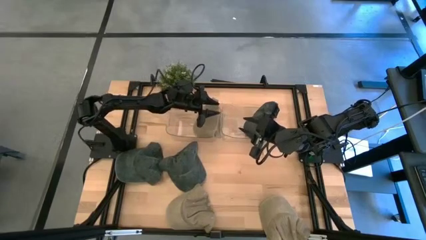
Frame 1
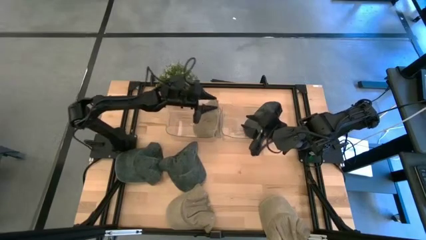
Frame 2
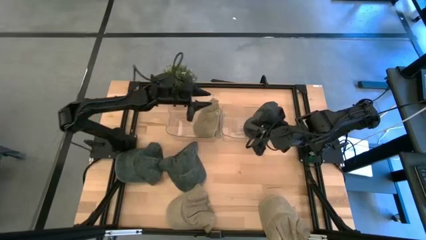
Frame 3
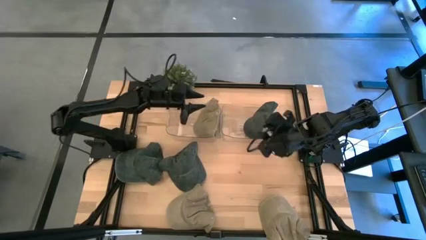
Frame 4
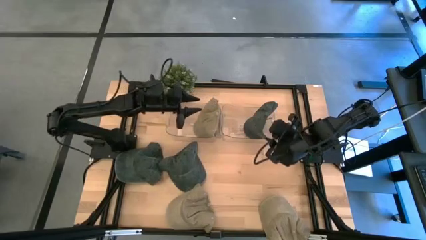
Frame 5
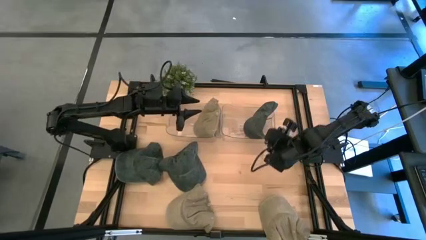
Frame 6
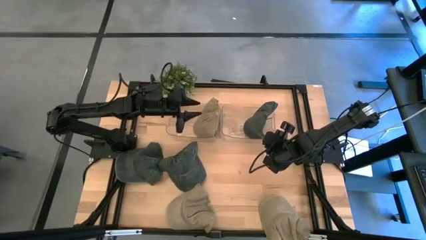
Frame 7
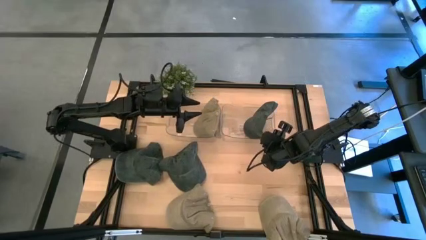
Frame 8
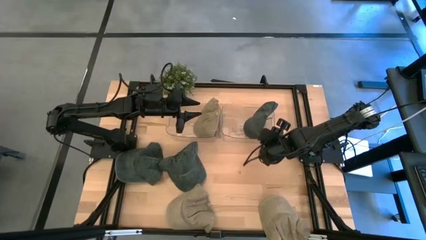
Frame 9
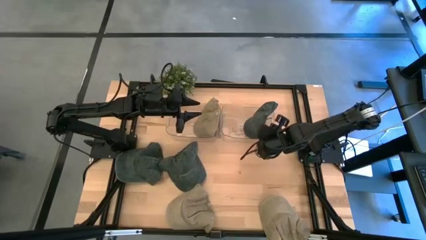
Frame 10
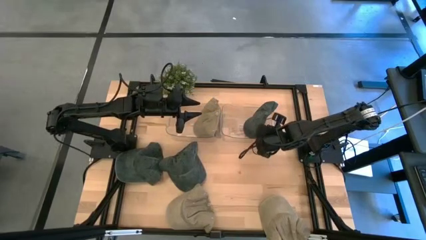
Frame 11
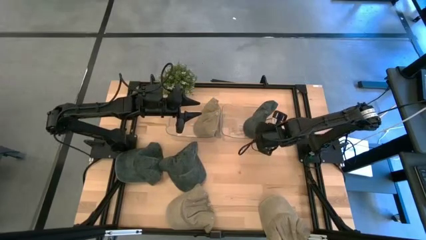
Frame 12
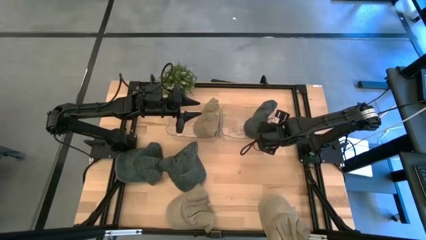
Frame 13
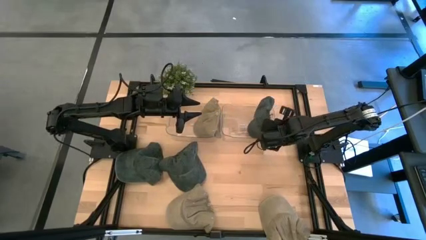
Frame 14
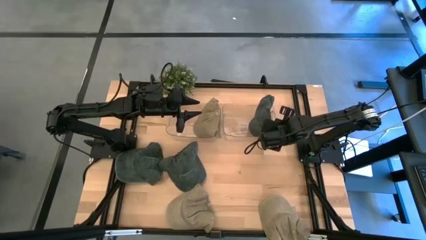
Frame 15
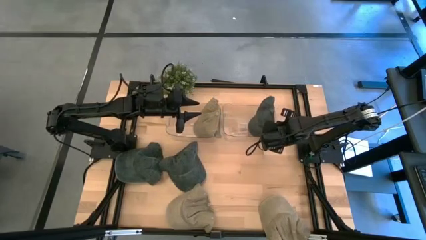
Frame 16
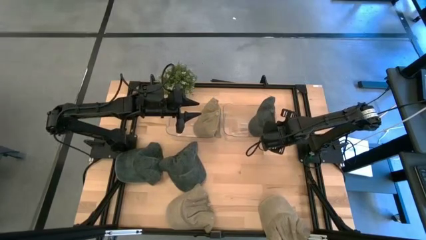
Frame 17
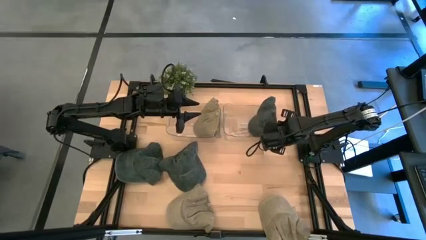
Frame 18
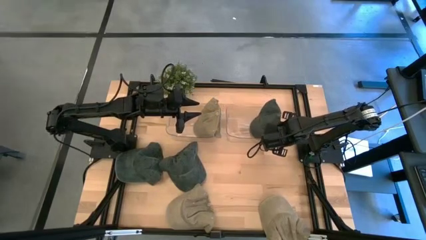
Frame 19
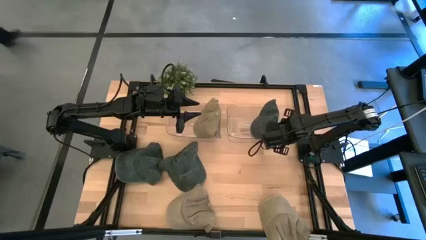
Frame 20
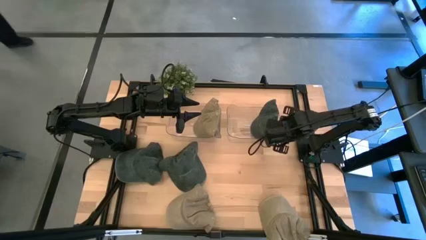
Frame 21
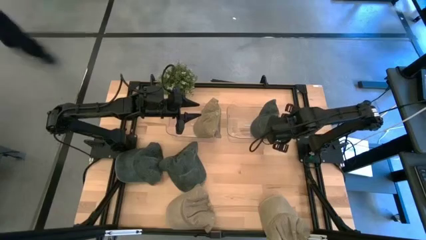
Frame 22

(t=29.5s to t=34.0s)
Task: Pick & Place hat
Adjust the black cap on the right transparent bin

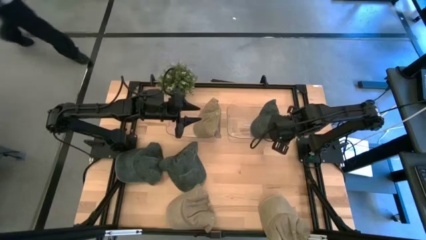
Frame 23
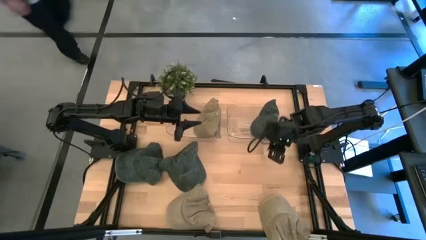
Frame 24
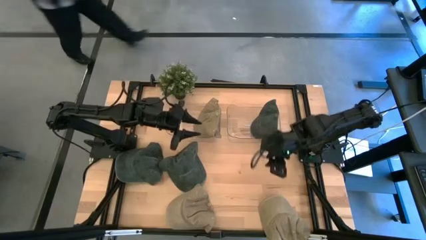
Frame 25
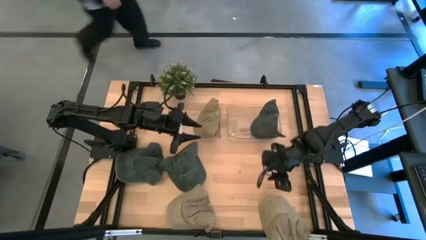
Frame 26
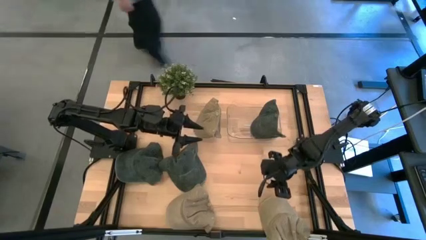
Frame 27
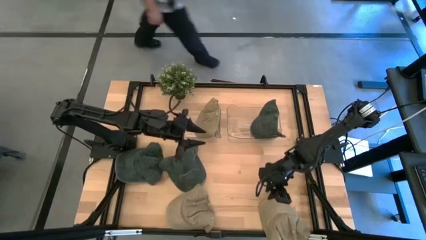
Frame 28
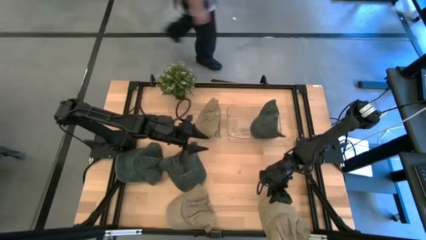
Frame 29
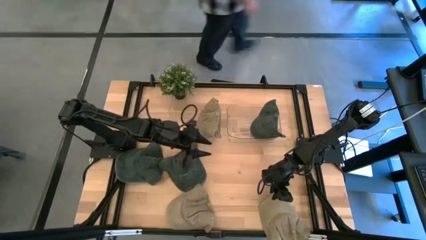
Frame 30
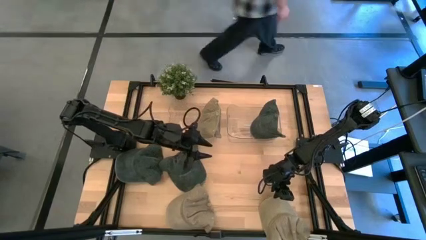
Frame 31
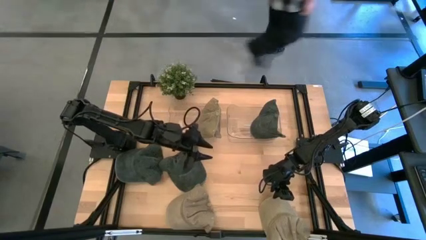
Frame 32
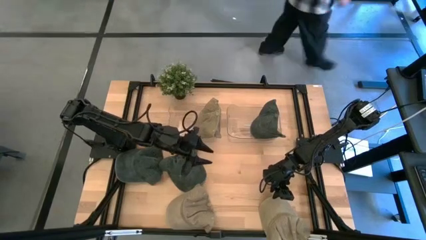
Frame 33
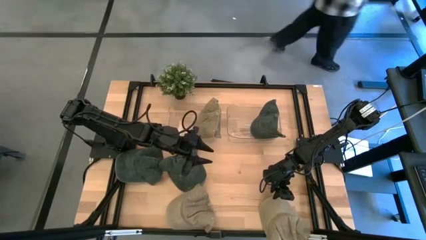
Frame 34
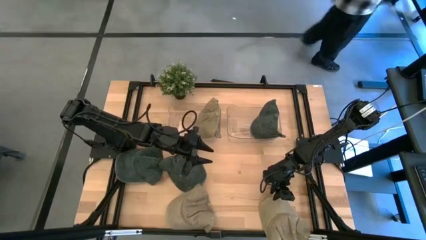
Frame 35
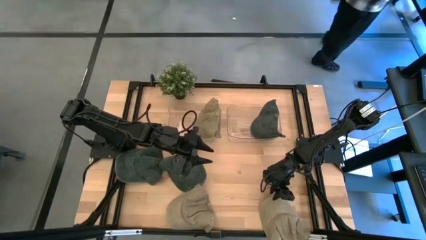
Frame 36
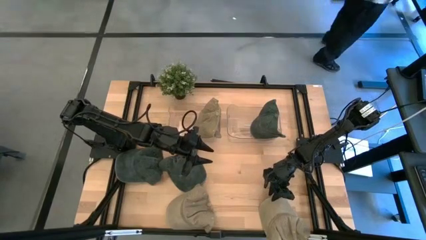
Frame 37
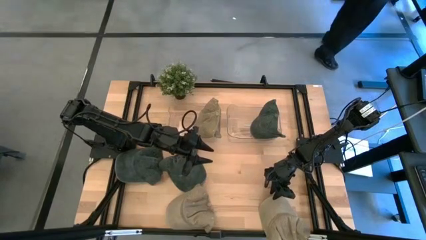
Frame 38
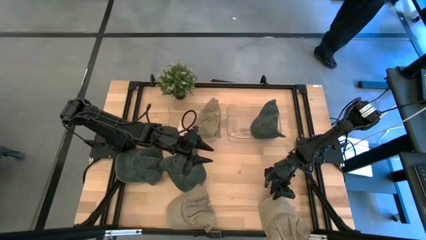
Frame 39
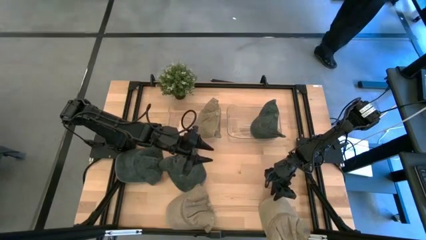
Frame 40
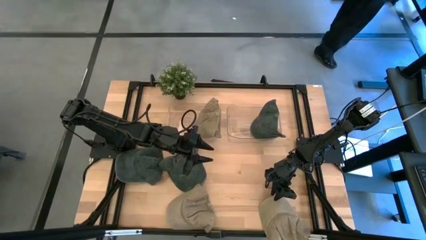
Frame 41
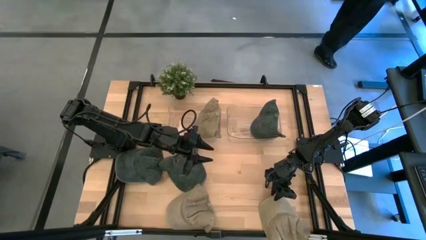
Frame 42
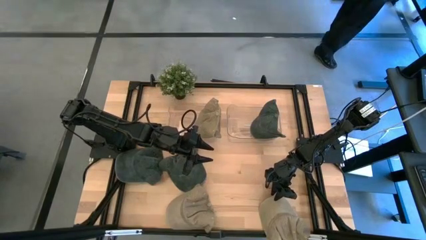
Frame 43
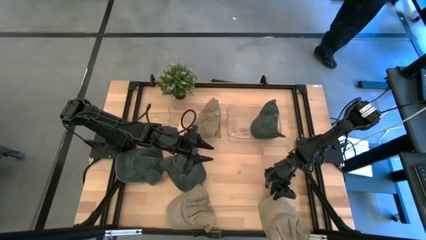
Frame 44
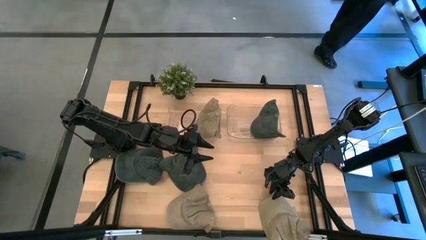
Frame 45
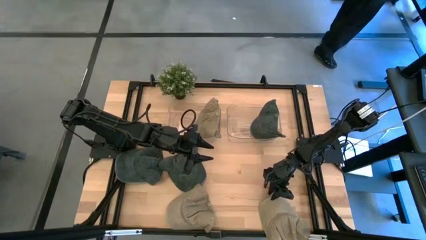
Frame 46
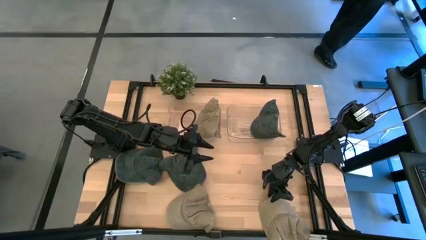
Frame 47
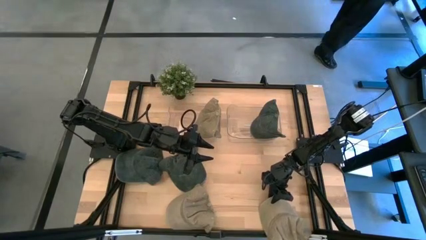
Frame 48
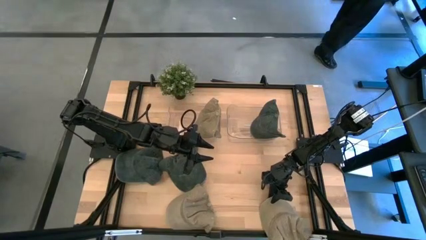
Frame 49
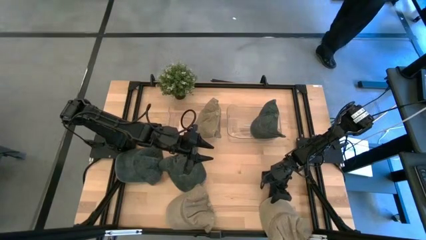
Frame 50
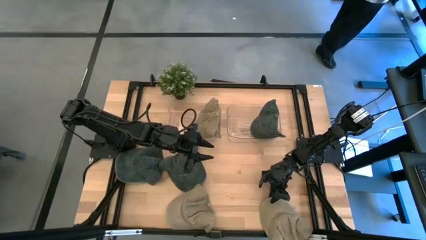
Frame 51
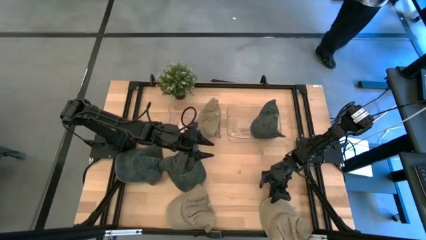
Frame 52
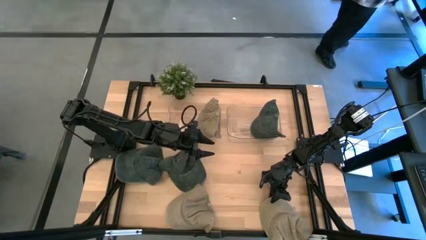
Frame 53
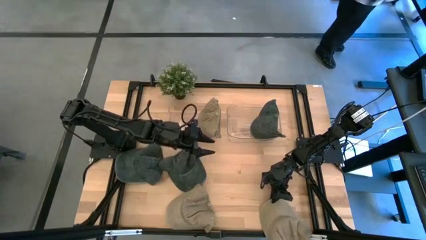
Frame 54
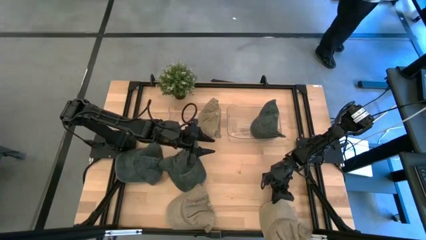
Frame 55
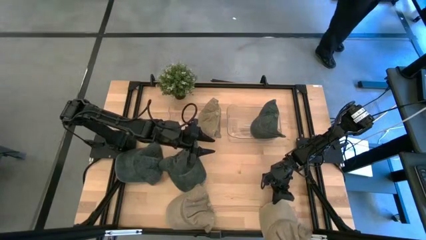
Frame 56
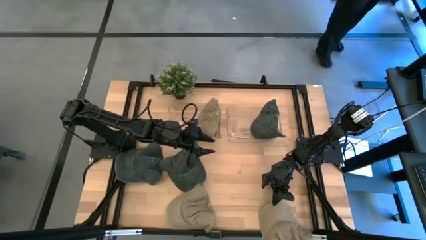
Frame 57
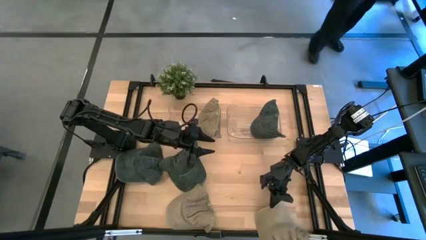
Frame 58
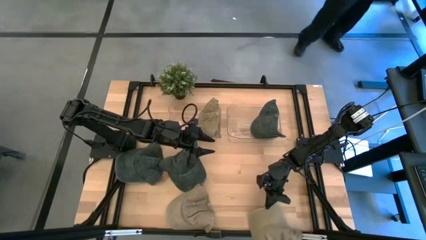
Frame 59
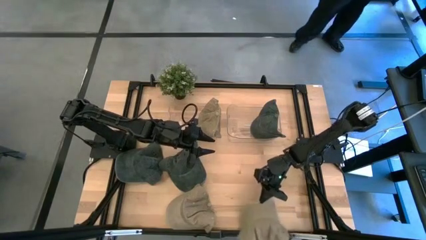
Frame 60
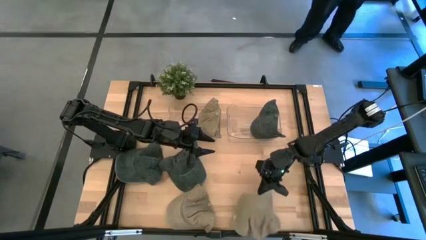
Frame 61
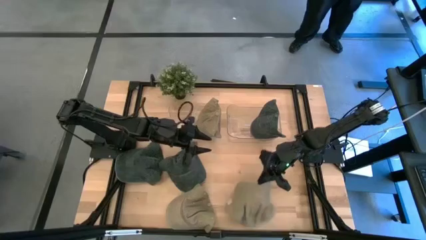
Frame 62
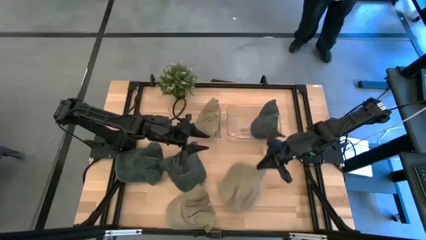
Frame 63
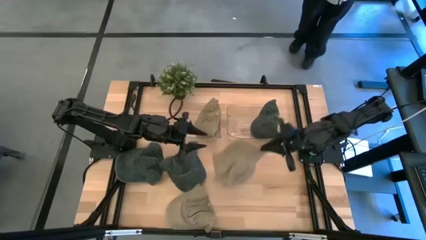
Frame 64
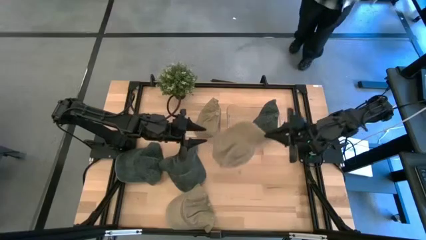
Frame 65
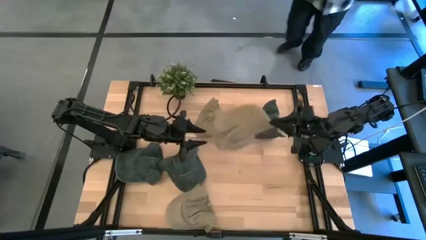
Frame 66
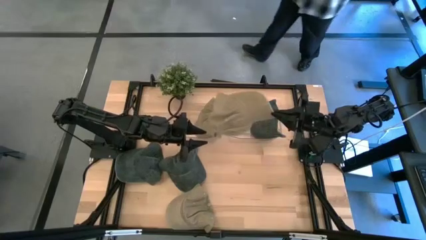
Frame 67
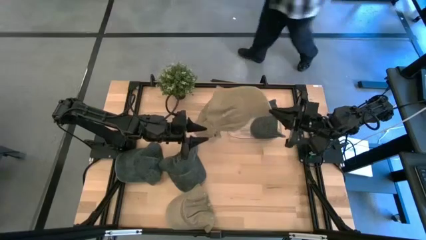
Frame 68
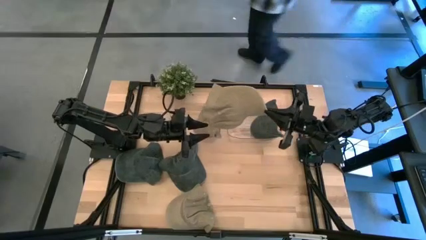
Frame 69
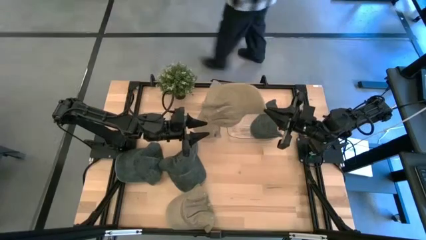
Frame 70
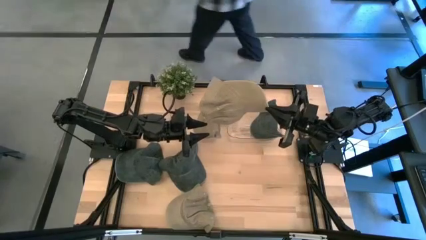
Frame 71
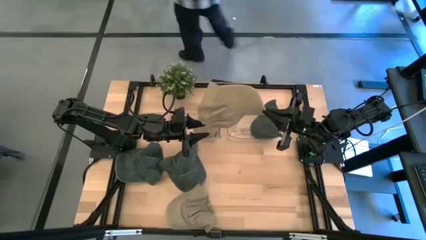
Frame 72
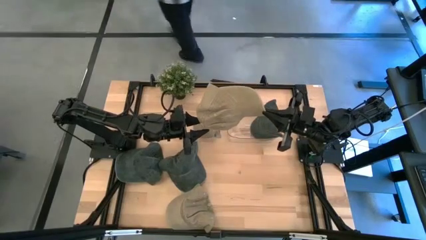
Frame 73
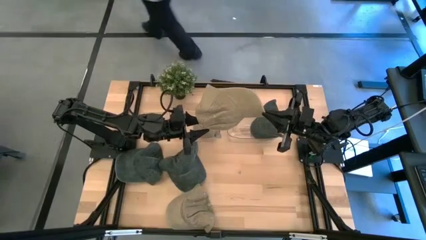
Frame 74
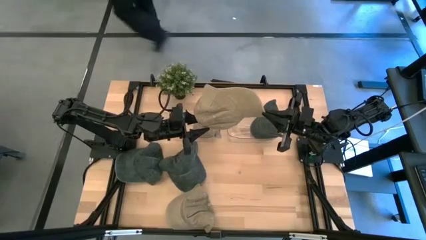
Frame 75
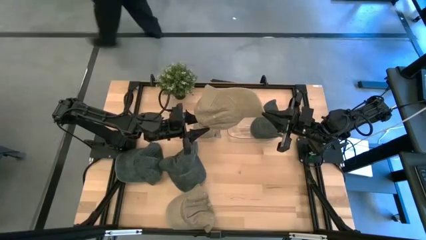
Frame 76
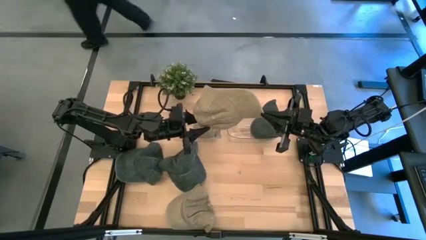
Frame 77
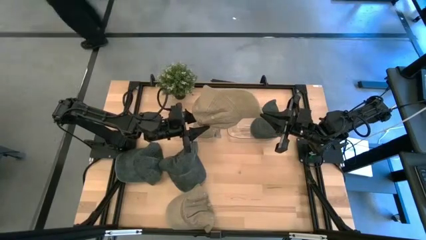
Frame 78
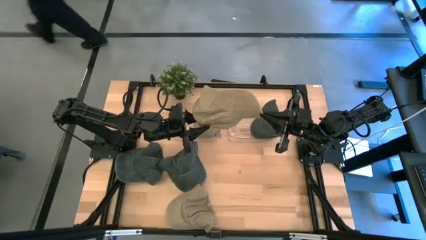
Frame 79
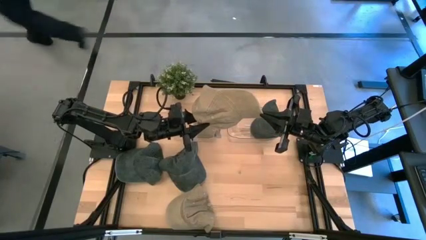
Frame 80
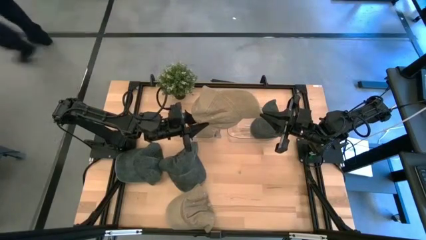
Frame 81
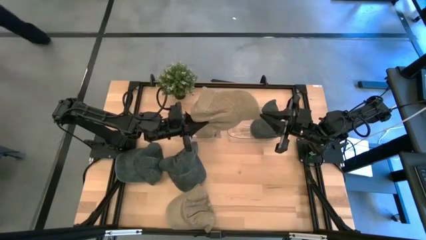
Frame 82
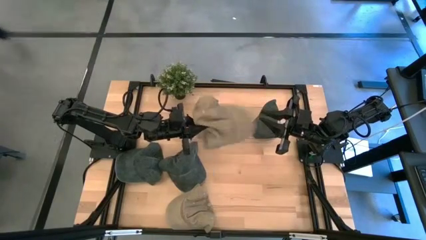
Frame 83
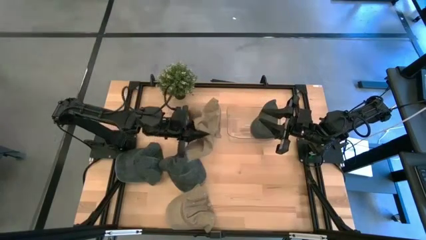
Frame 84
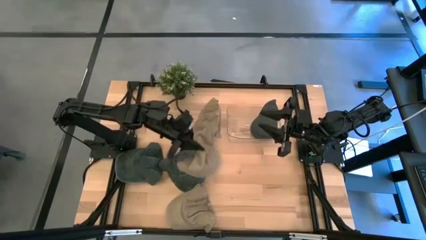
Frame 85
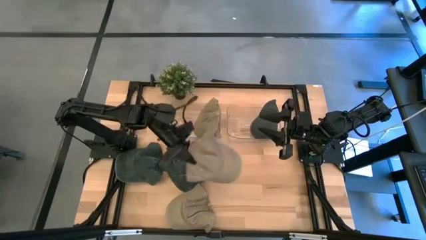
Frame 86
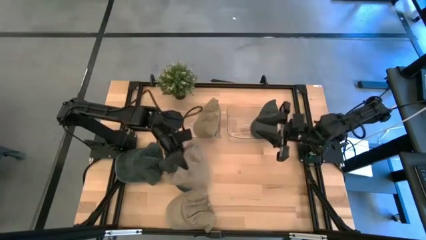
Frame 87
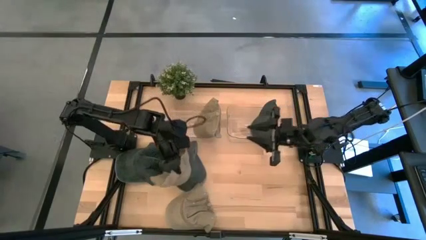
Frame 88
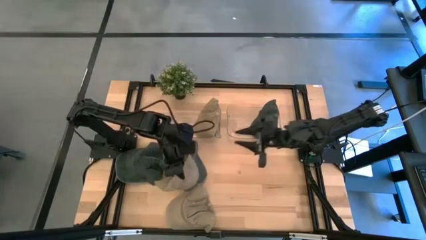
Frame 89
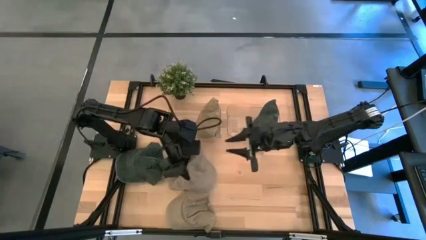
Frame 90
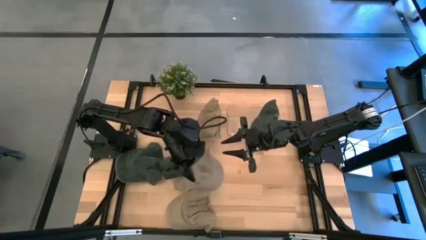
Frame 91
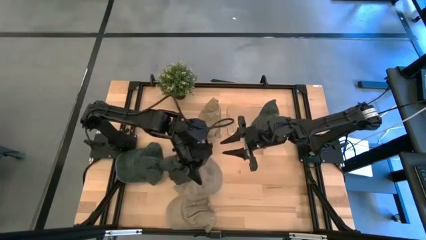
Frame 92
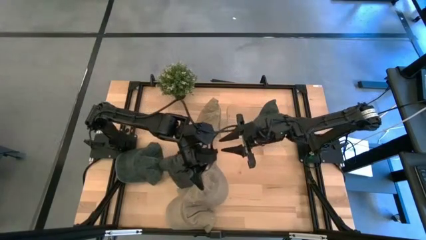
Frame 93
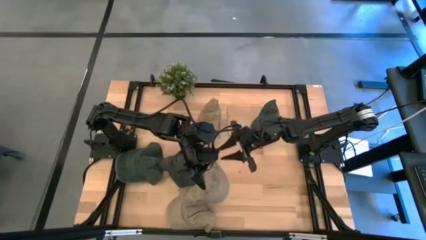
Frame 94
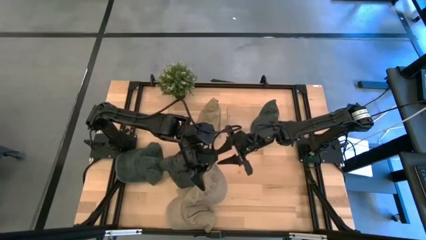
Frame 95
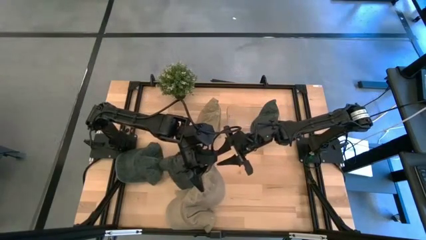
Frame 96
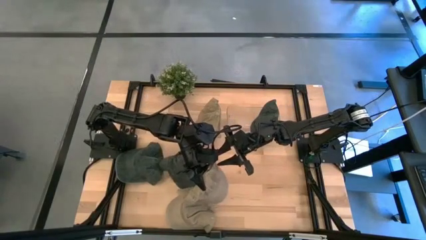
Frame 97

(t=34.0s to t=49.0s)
Put the right brown cap into the left transparent bin
